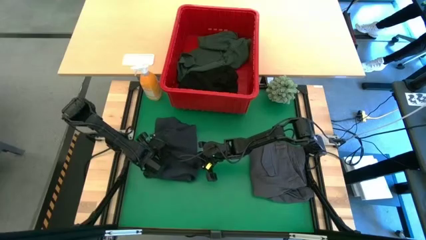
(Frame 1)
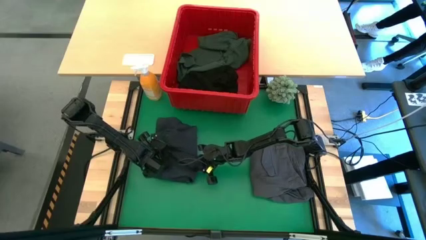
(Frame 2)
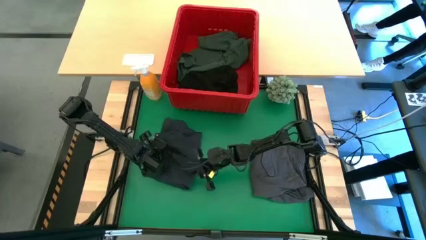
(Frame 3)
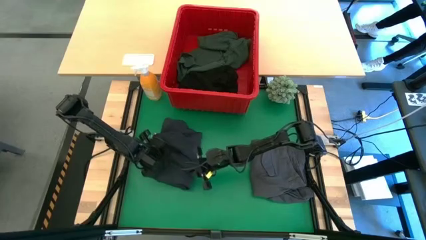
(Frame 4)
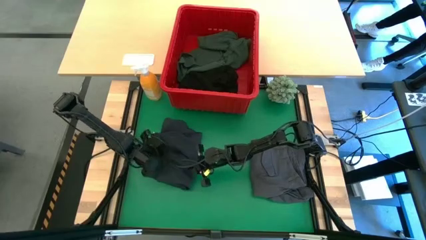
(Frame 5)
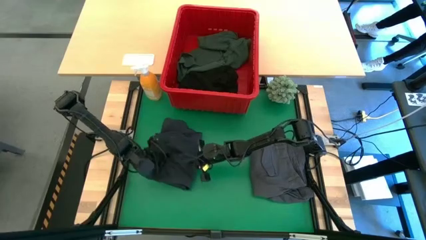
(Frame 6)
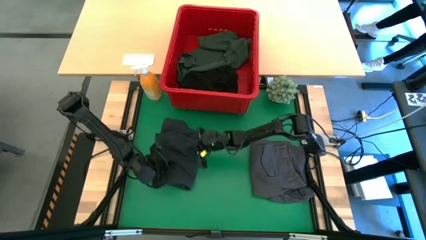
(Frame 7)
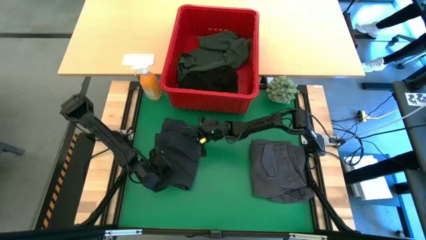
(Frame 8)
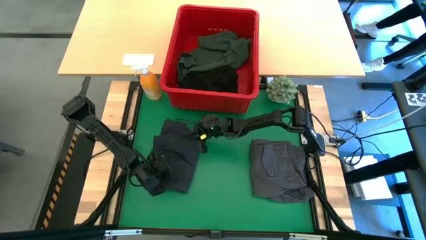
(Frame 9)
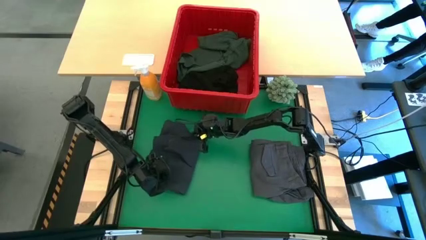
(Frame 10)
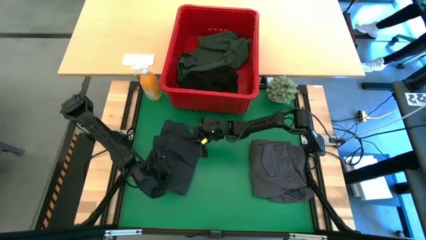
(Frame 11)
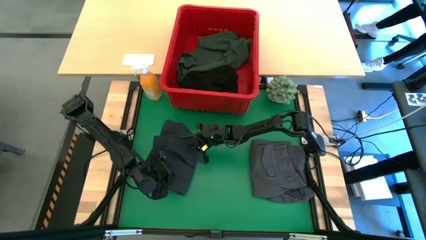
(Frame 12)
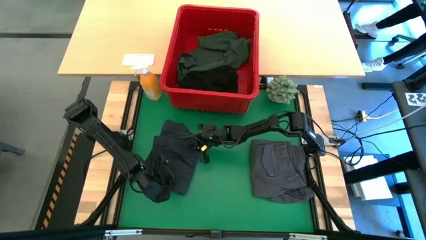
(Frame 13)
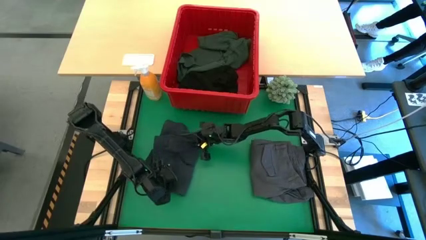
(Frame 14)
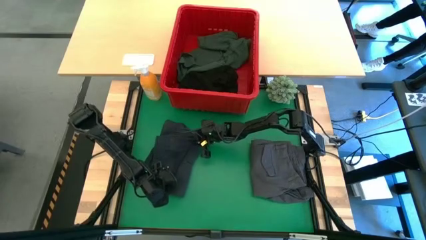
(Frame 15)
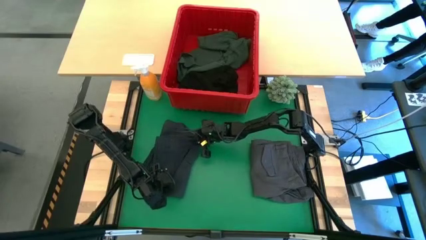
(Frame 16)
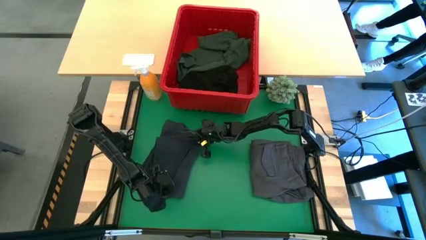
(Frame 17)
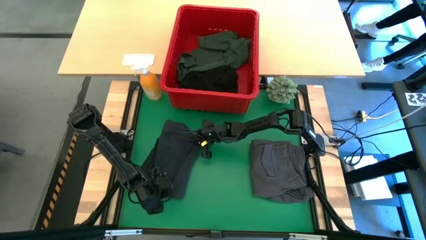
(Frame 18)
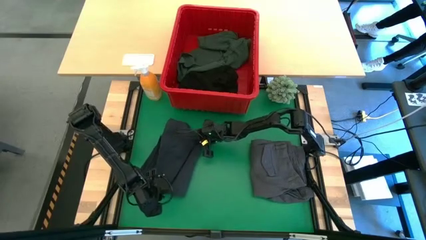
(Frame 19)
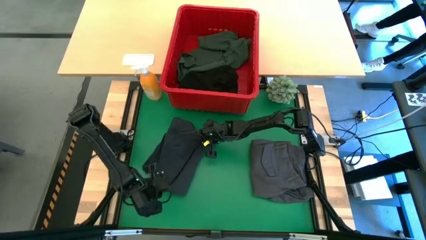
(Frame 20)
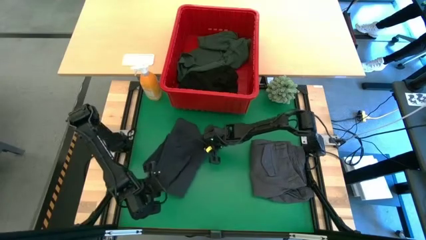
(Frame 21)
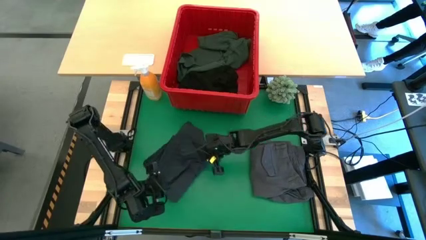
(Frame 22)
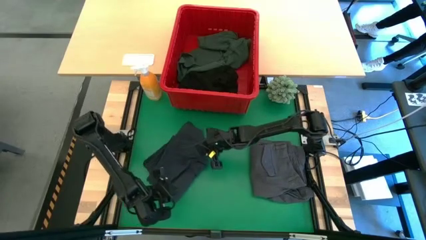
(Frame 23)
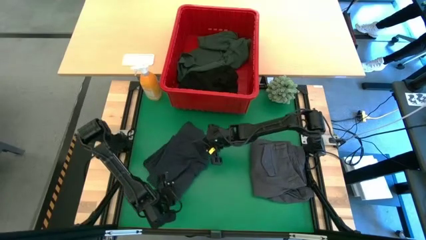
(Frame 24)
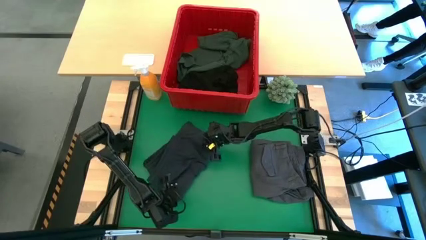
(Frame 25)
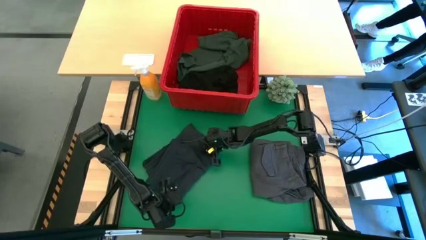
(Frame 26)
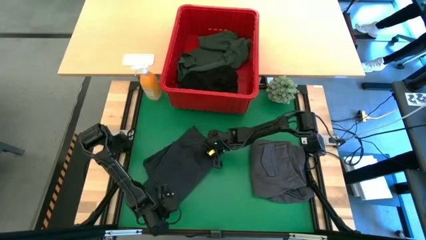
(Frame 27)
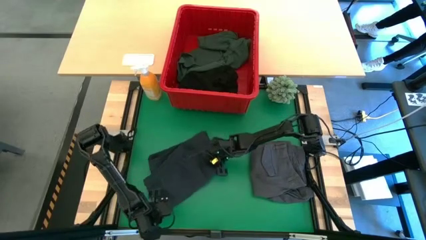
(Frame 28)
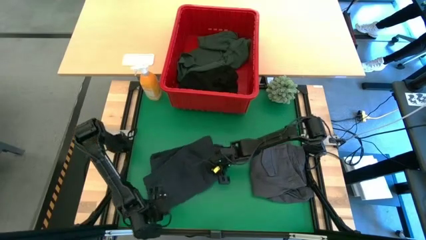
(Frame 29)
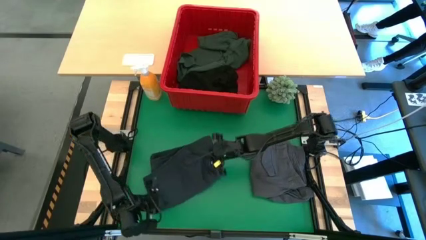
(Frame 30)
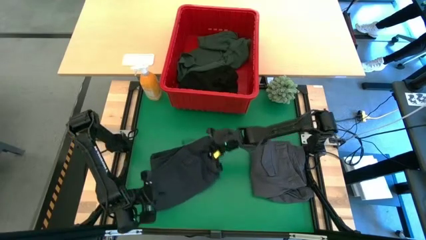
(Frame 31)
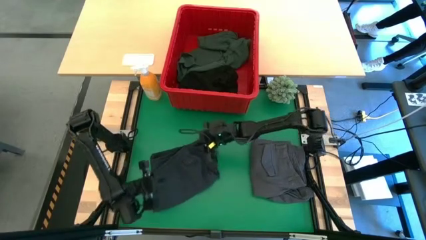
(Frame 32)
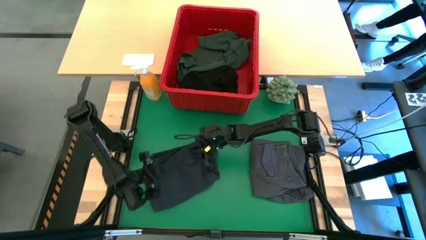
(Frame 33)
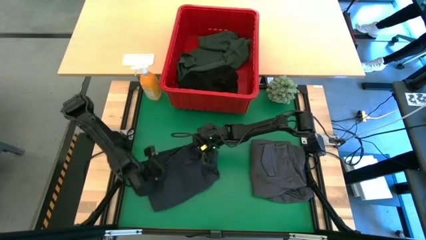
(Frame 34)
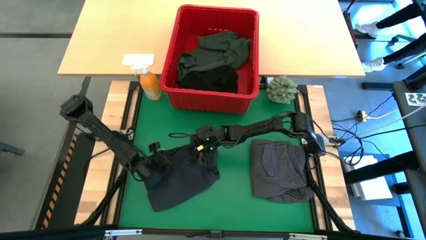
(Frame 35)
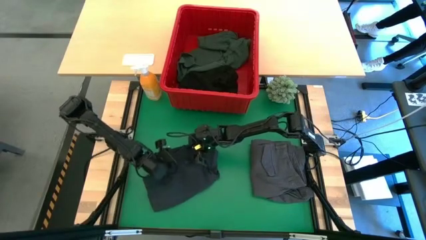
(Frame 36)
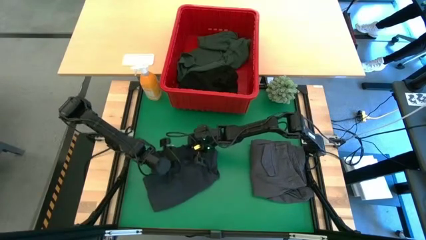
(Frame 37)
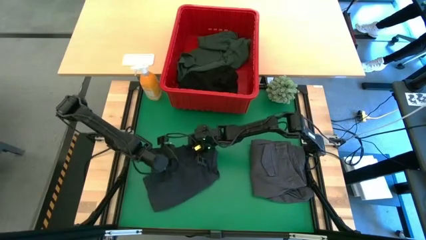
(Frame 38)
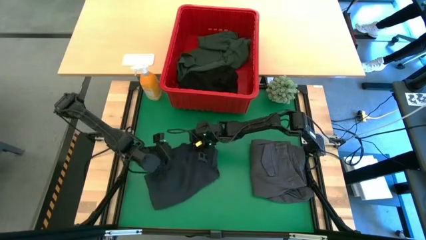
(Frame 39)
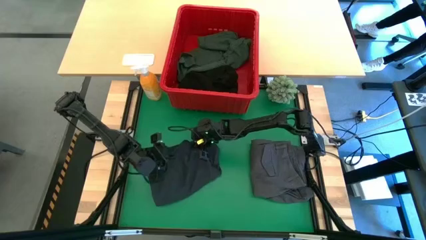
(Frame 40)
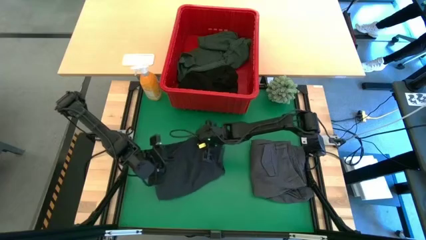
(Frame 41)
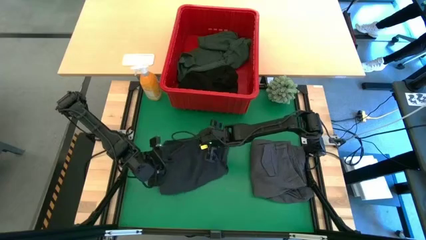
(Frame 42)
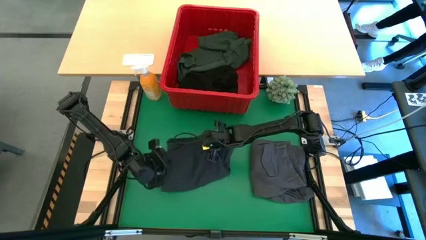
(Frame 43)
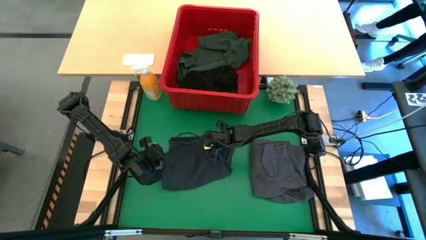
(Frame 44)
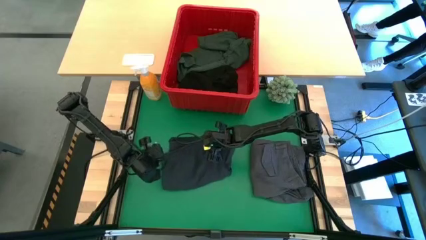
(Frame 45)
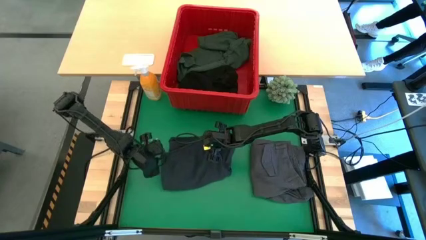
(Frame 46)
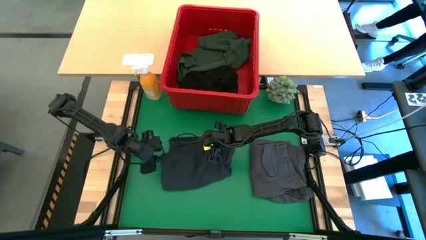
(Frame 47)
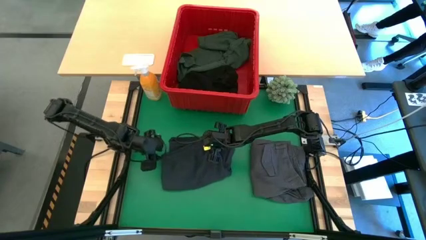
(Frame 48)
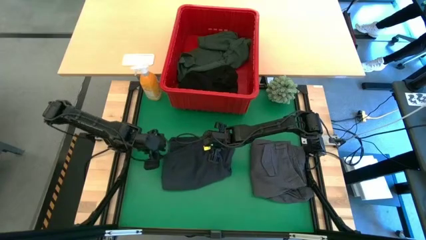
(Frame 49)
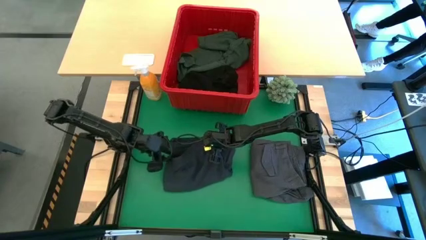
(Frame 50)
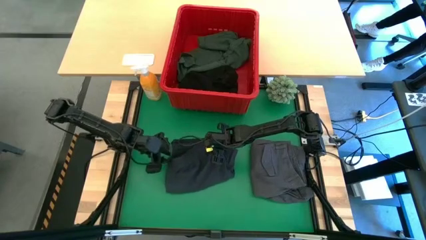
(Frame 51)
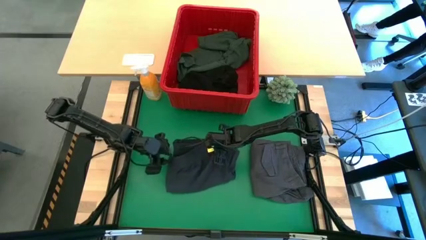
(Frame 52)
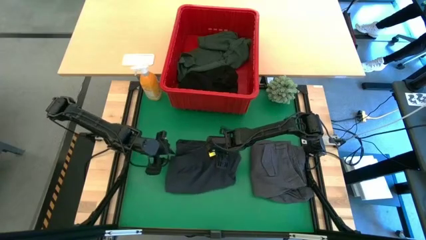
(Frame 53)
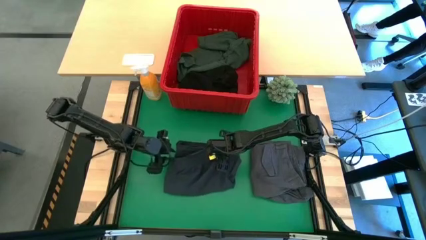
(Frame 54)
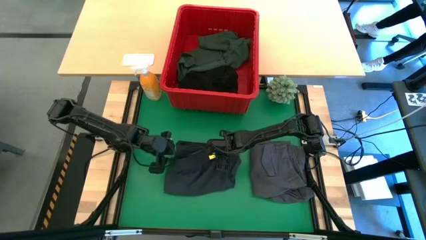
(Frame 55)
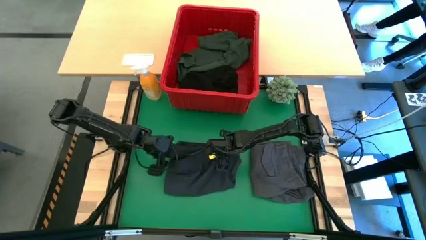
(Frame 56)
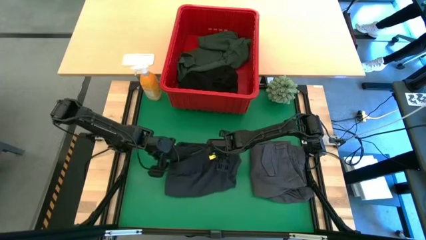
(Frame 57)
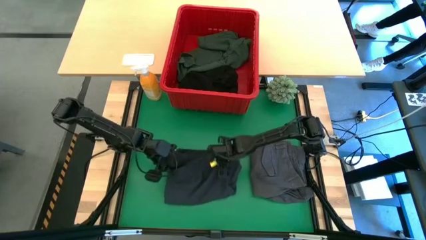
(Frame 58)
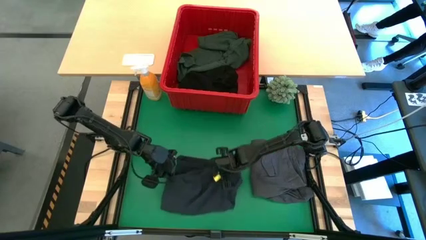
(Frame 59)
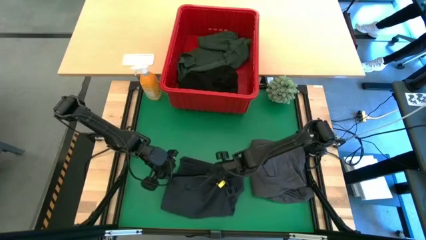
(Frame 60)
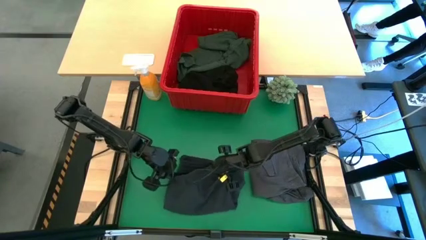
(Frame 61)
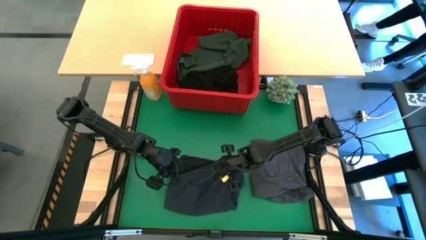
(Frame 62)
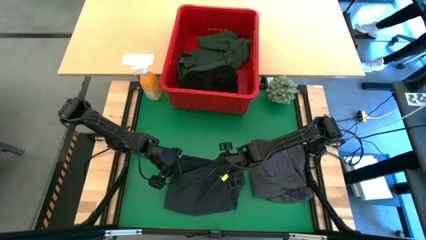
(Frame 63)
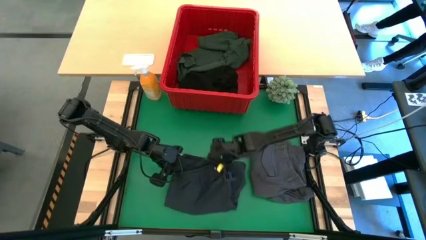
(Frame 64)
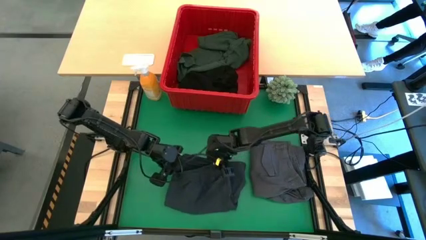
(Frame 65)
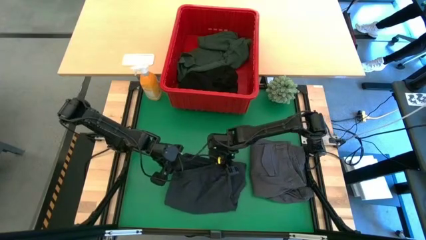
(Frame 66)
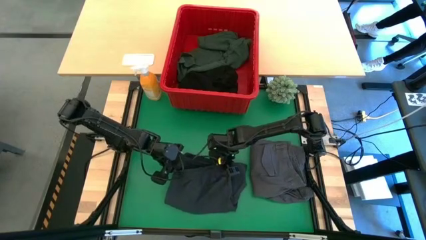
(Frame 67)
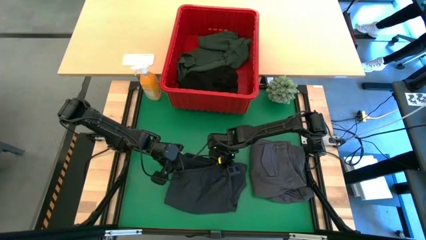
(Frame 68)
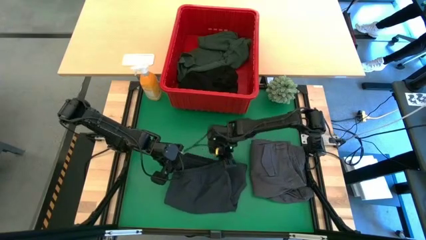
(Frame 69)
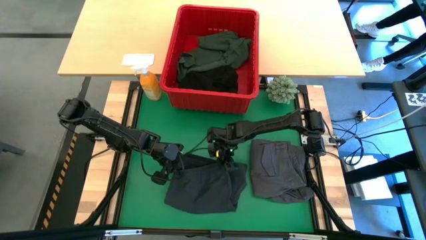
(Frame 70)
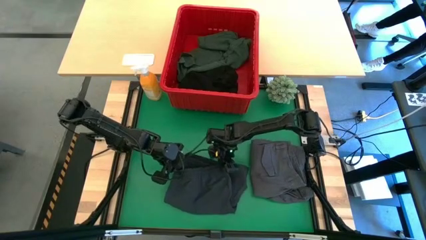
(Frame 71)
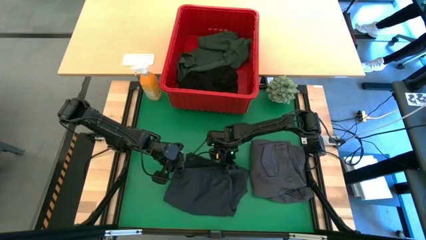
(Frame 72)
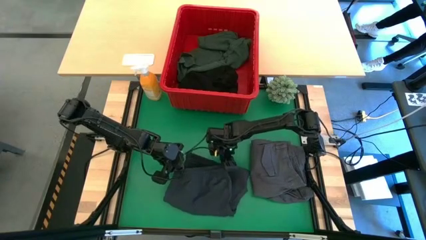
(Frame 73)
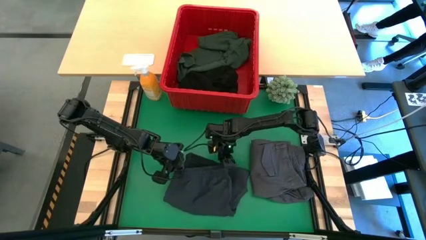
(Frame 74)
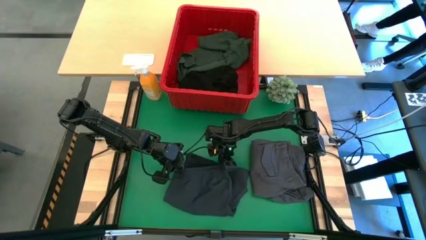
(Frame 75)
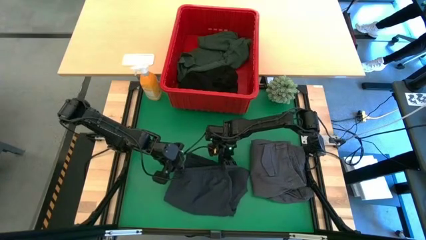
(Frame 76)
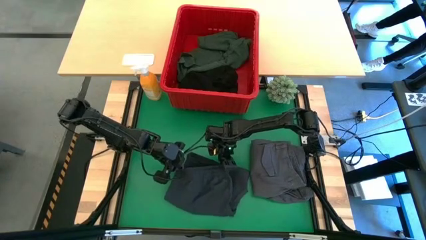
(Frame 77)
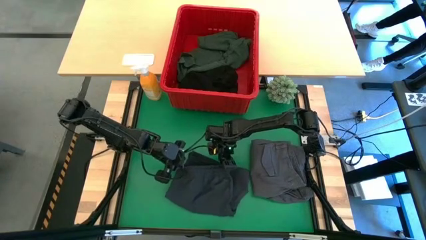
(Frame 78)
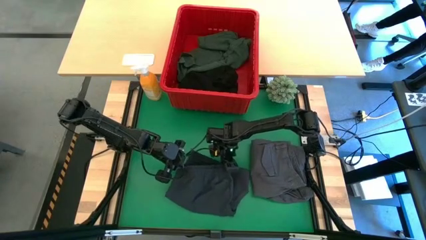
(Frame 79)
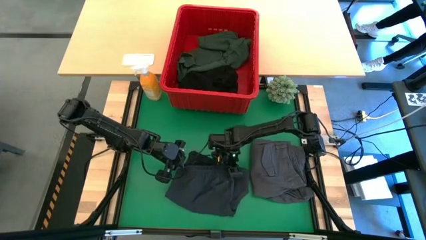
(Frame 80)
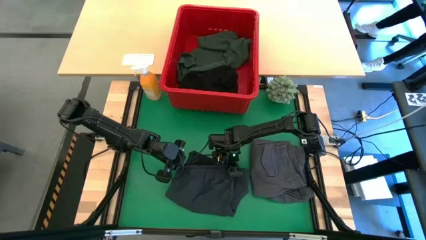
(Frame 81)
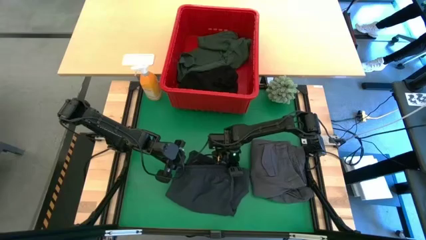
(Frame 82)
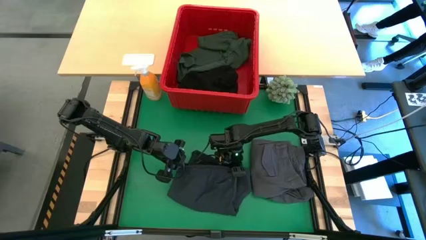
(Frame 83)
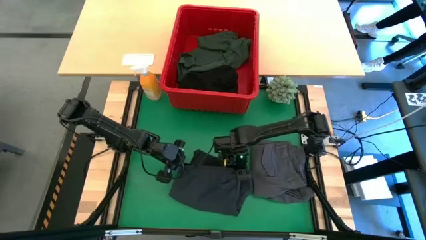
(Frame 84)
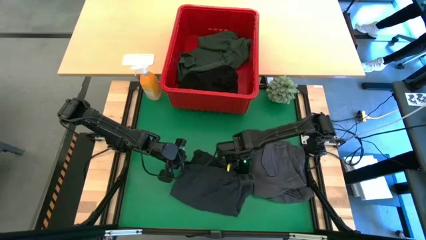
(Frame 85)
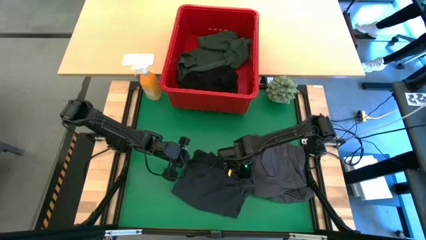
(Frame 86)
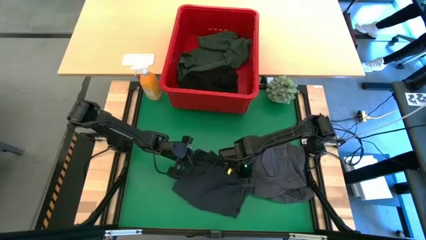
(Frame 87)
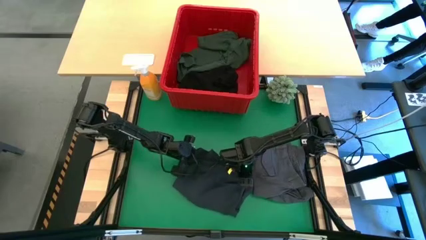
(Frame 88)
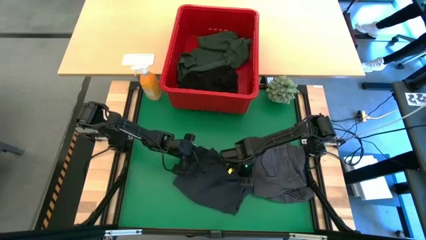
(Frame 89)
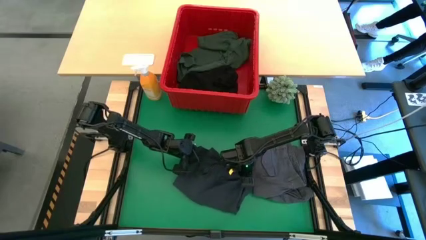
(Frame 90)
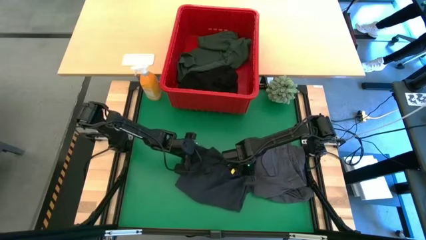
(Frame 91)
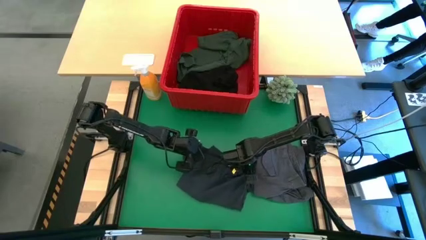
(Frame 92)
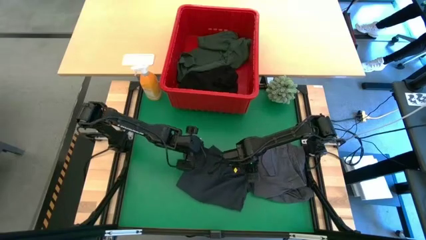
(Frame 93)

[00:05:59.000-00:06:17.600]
Task: Fold Laundry from Bin
Fold the dark gray short
